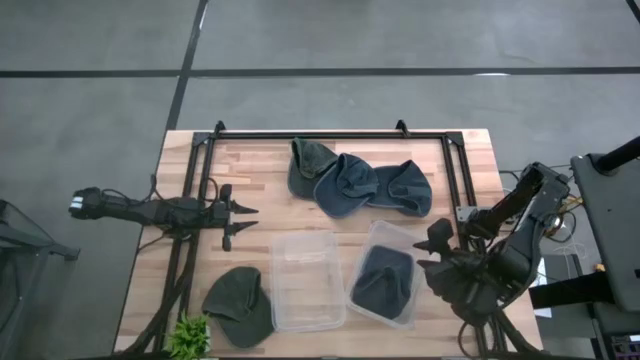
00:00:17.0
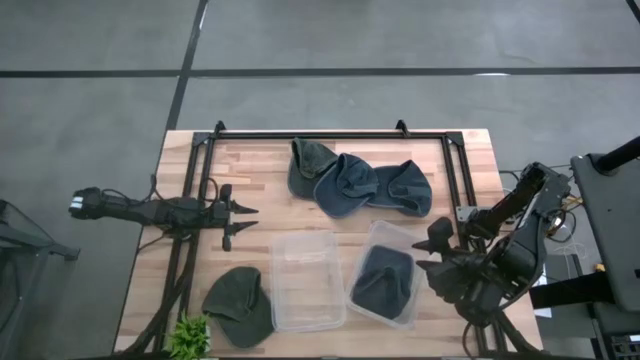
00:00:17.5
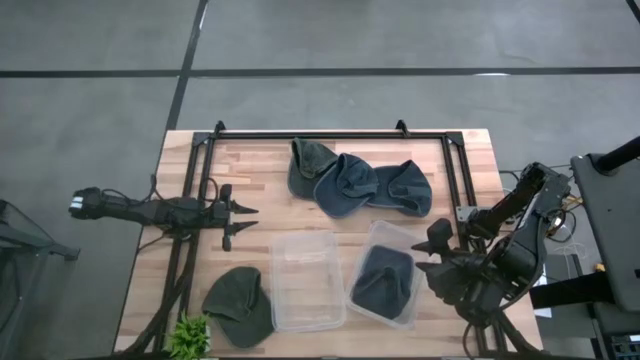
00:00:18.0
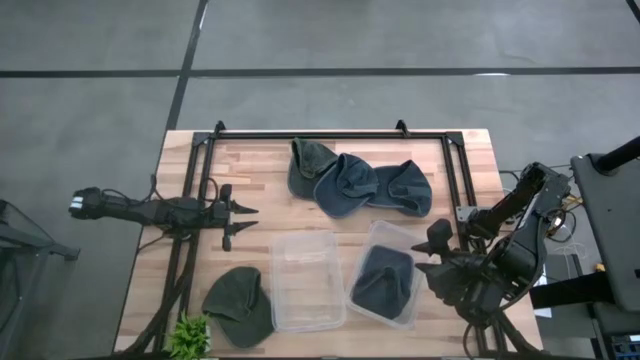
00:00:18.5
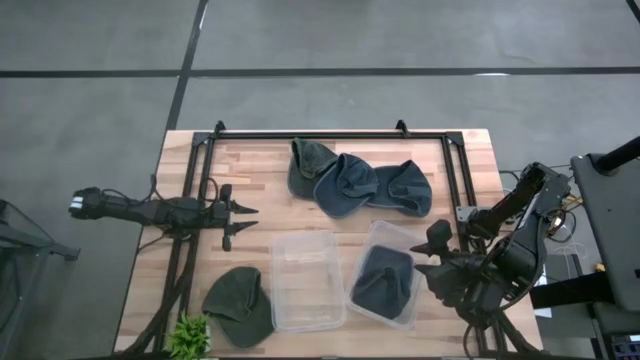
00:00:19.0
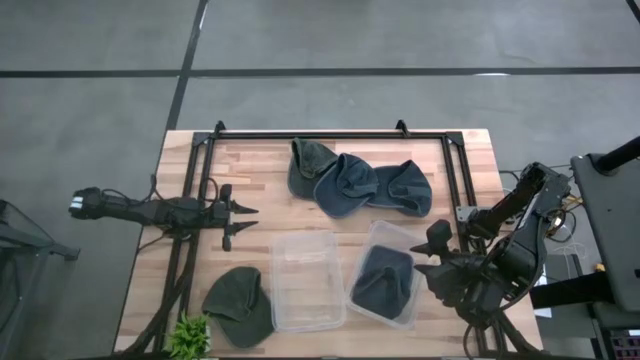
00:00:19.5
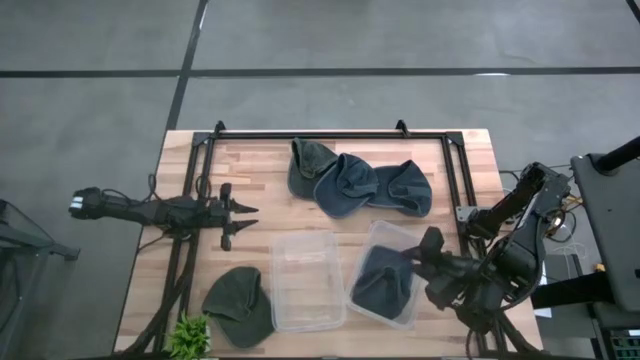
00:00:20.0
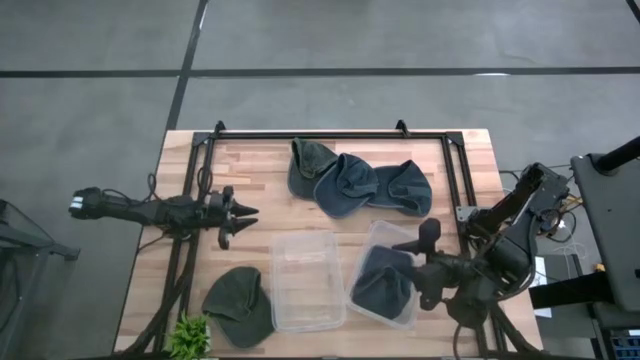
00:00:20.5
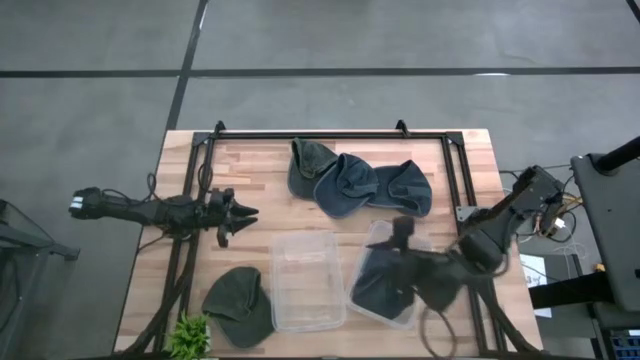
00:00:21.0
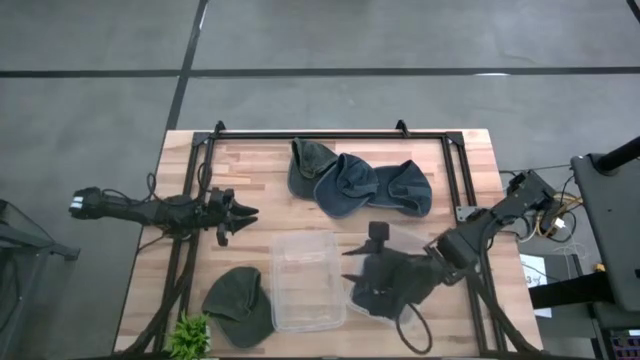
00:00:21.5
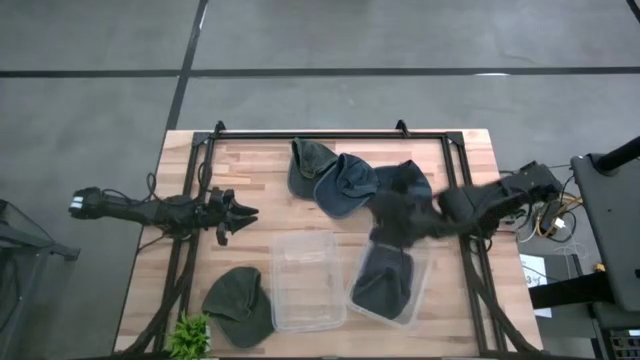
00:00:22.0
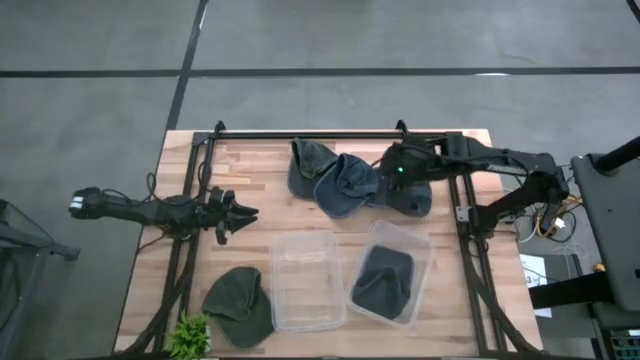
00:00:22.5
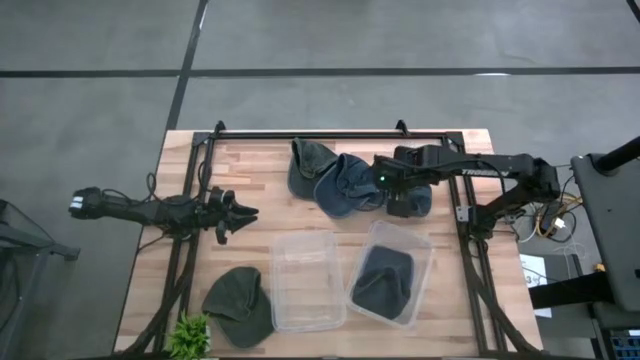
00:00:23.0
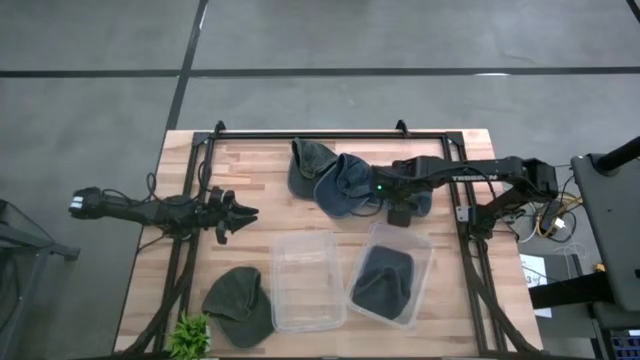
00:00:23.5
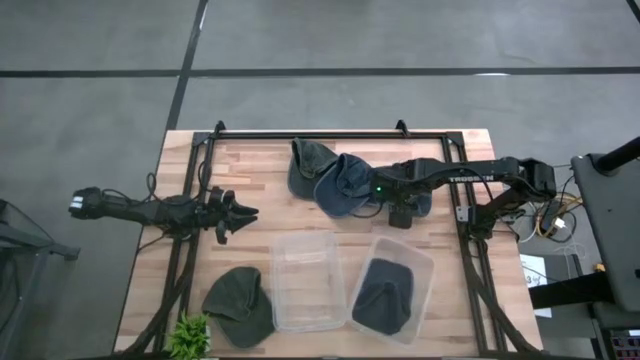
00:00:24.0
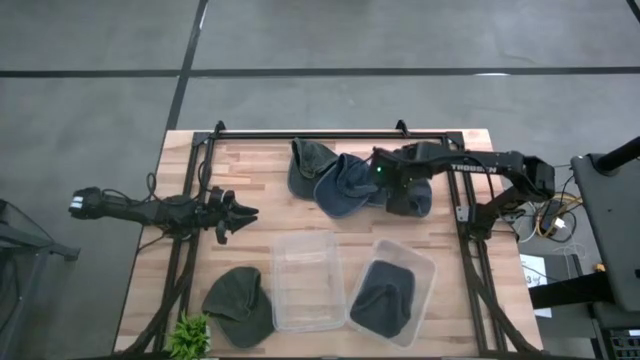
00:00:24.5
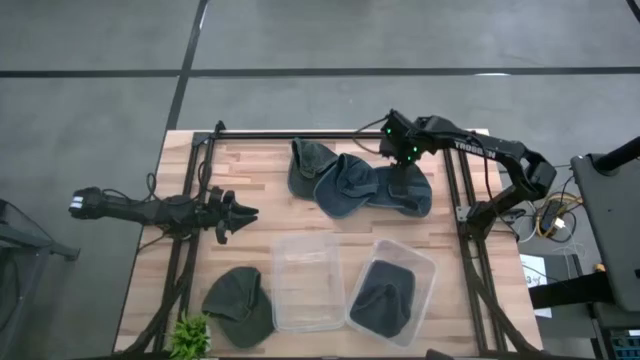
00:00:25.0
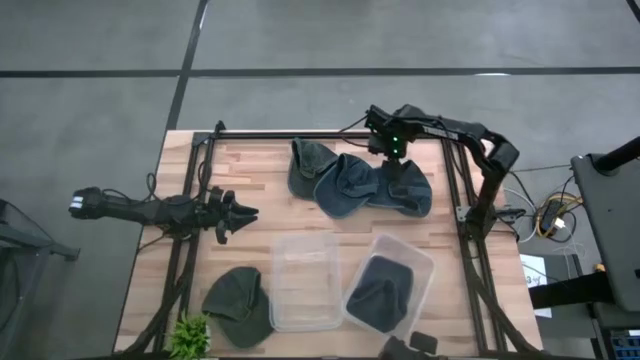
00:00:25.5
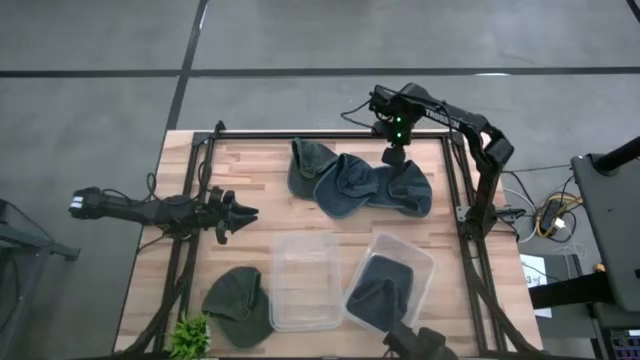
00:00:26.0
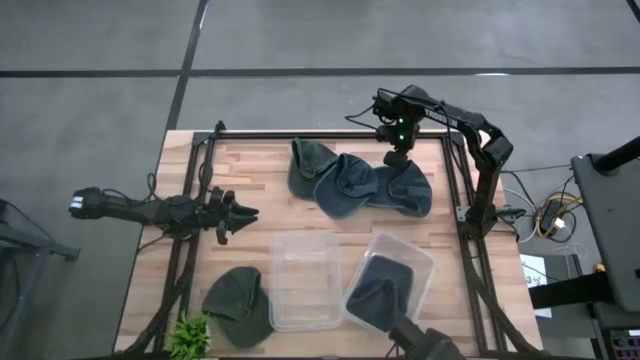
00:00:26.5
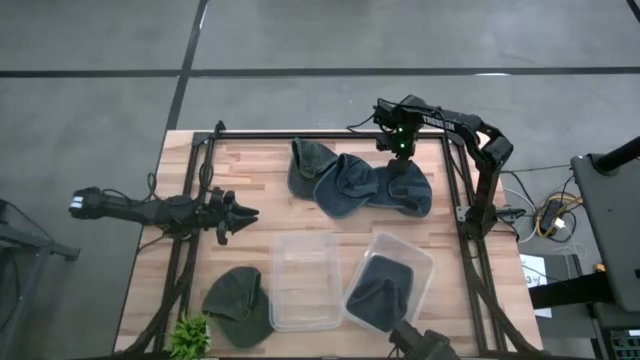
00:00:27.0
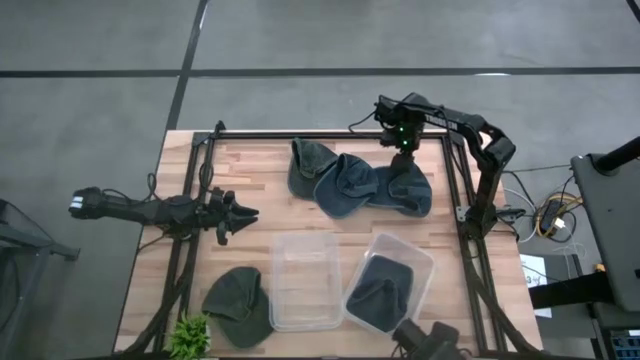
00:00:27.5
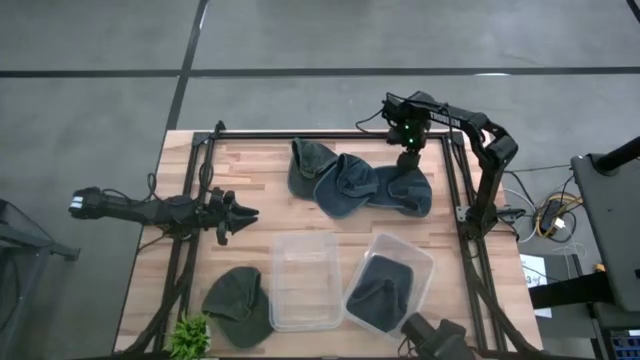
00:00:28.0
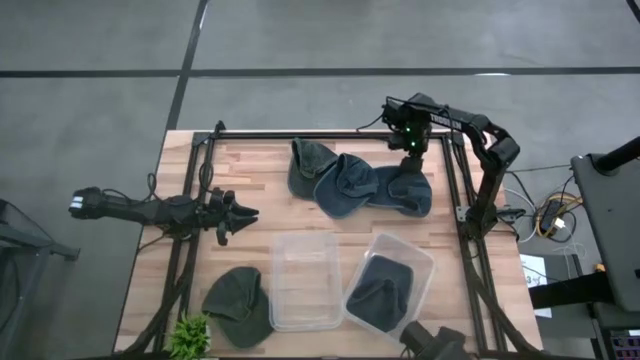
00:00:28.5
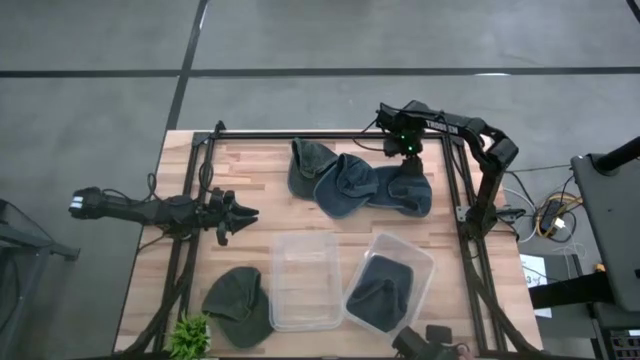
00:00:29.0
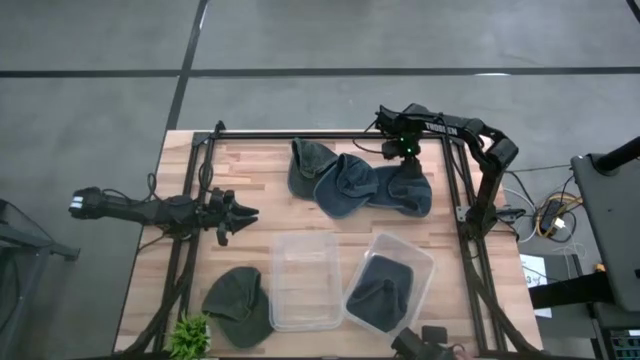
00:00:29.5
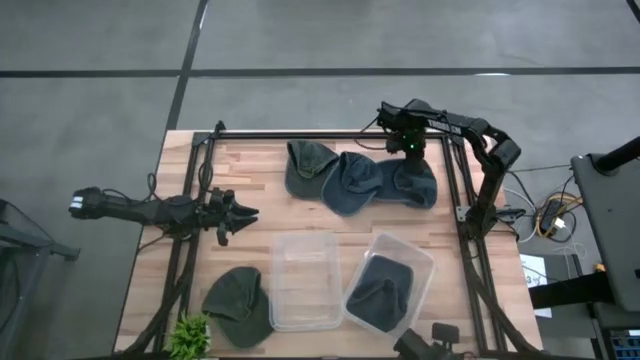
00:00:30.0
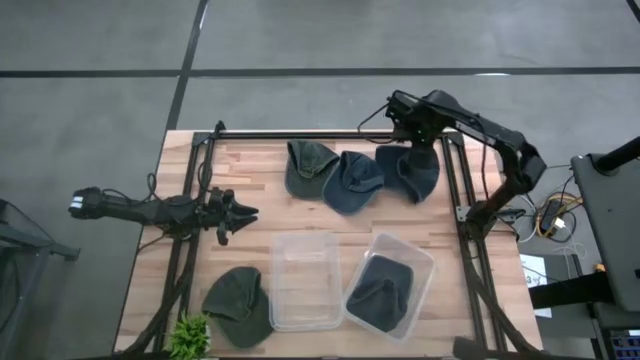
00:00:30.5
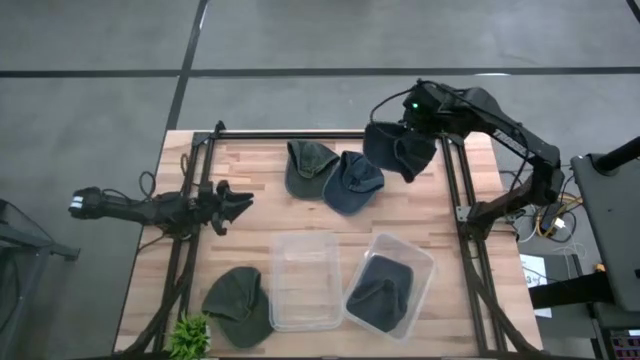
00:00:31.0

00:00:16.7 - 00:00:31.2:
Task: Pick & Place hat
Put the right blue cap into the right transparent container

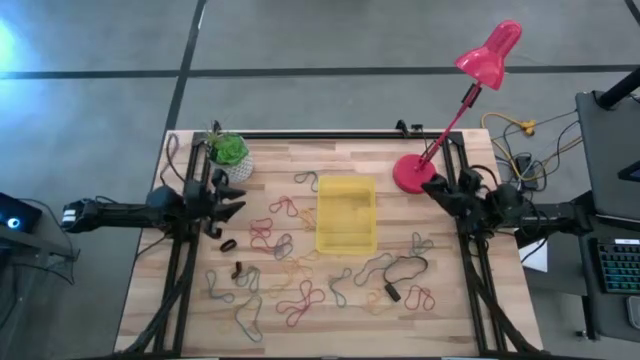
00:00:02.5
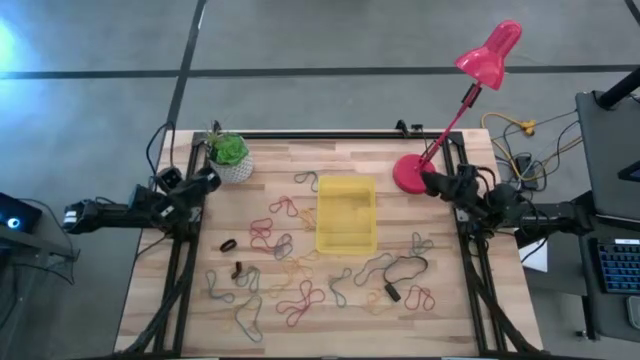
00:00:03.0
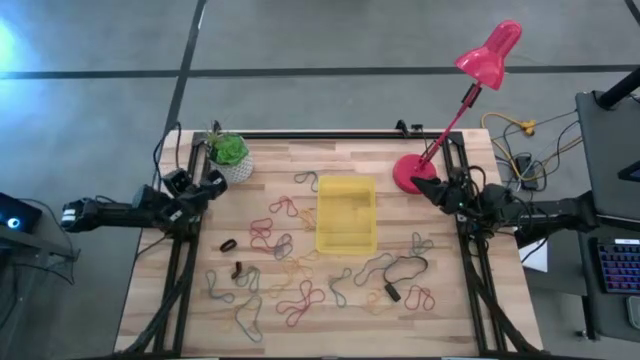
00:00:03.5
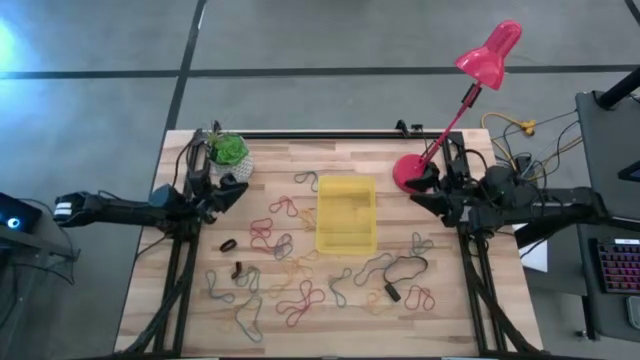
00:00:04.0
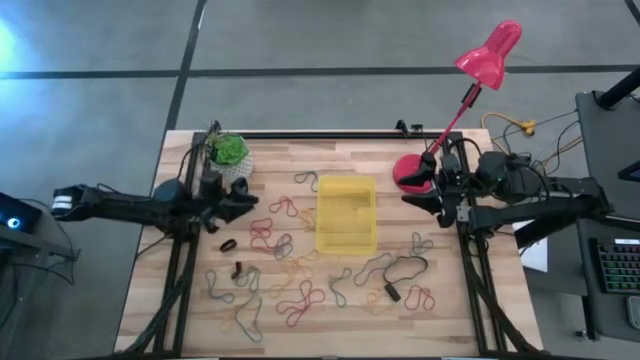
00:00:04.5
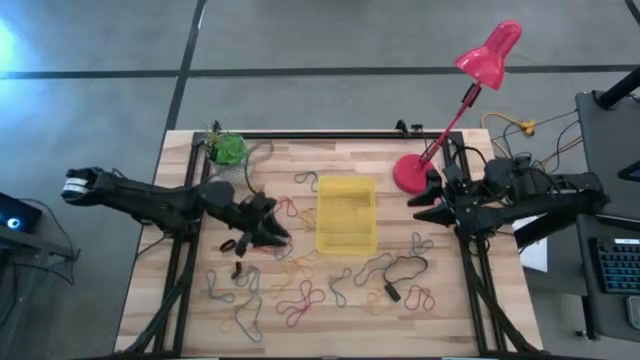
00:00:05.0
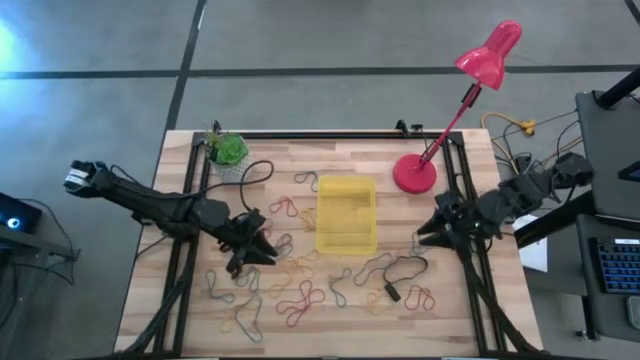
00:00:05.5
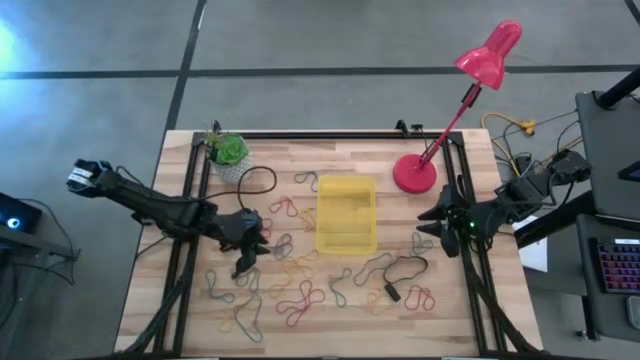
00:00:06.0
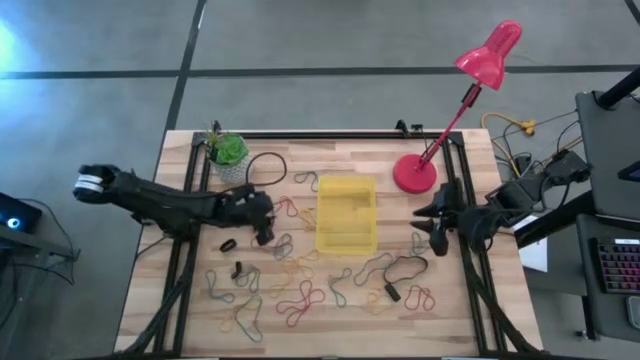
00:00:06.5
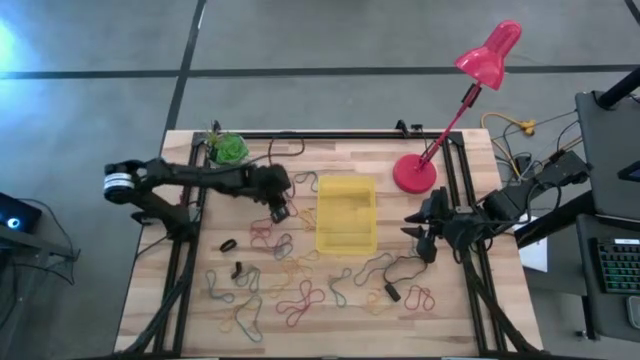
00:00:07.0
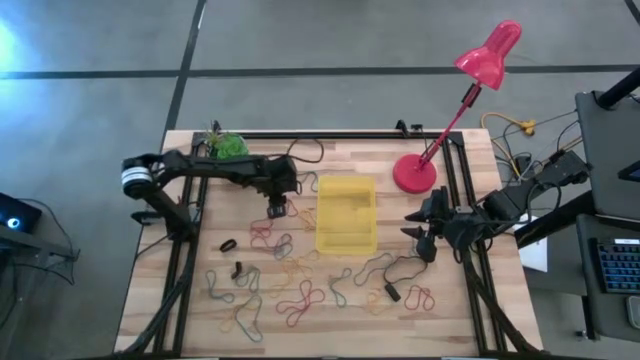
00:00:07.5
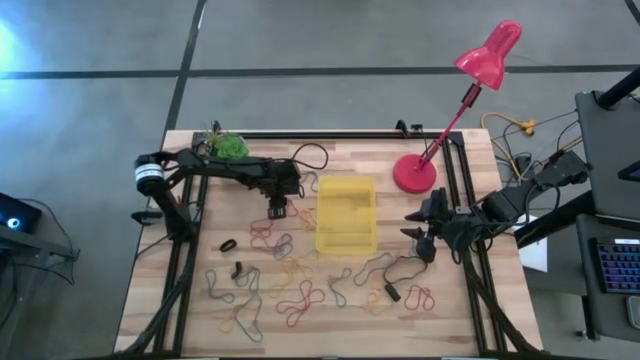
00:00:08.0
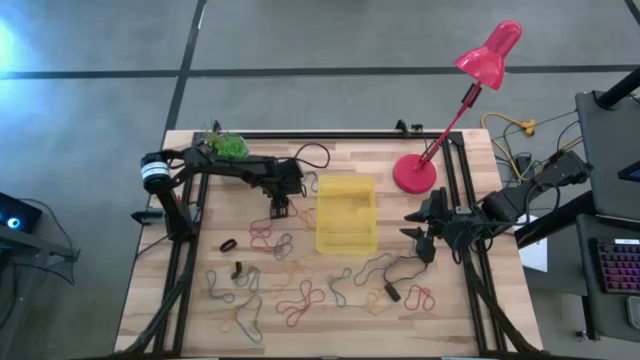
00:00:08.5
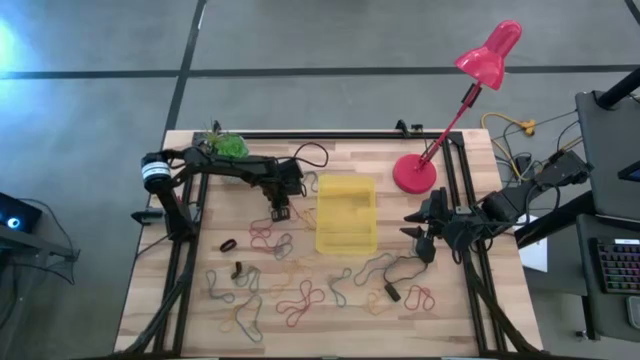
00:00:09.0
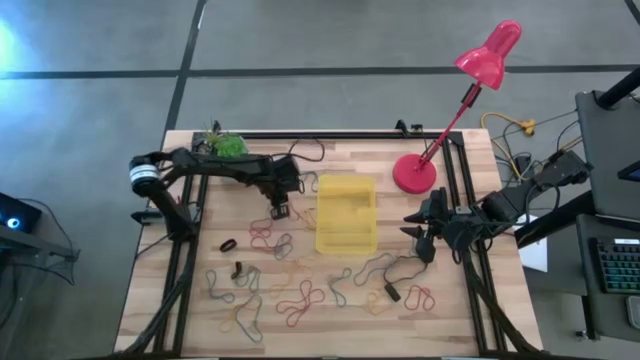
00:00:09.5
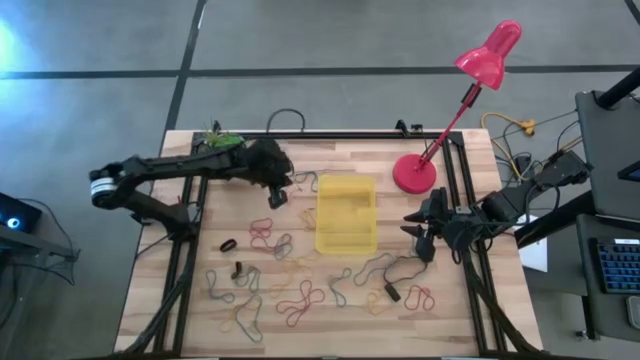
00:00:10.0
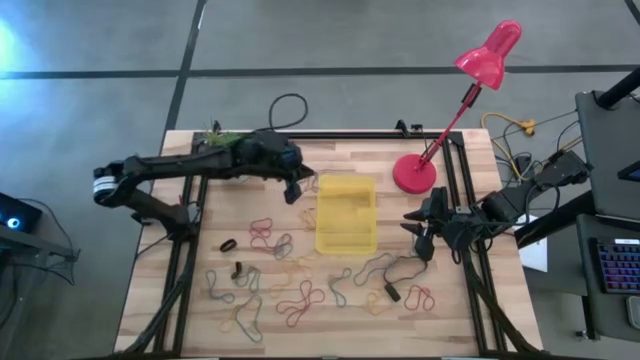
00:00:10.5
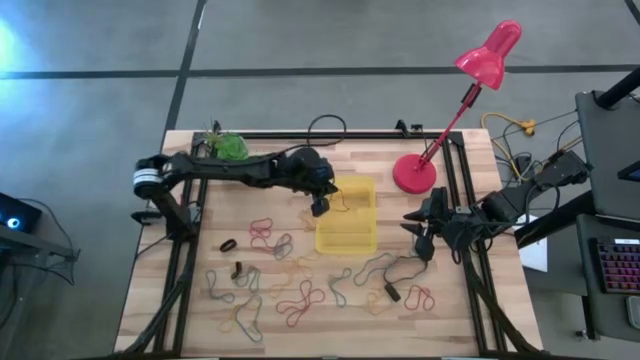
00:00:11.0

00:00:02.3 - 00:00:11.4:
Task: Pick and place rubber bands into bin
Put the red rubber band into the bin
